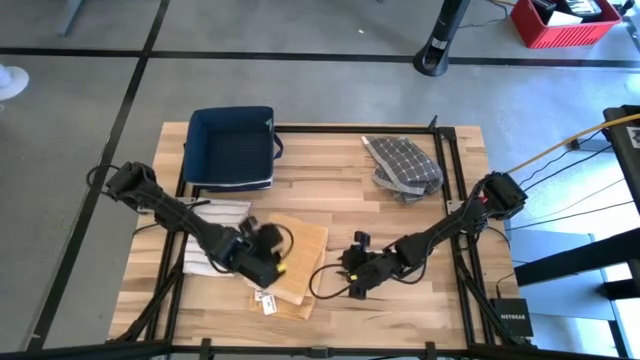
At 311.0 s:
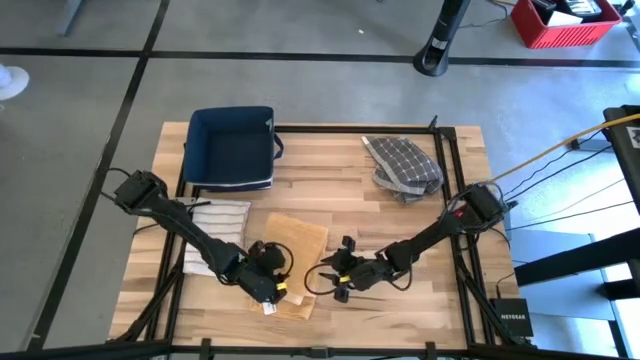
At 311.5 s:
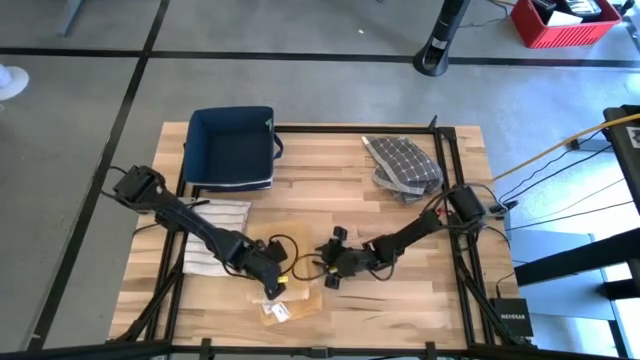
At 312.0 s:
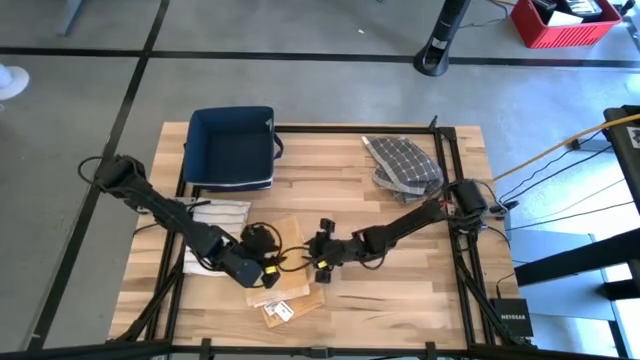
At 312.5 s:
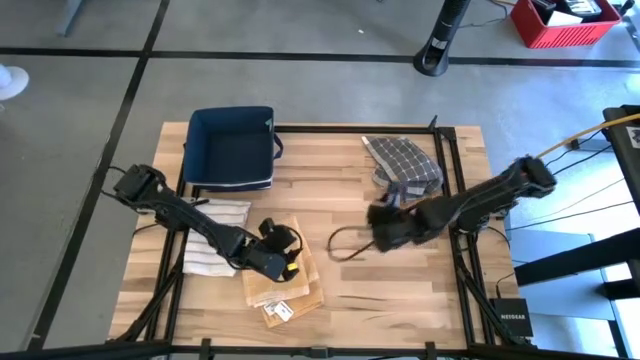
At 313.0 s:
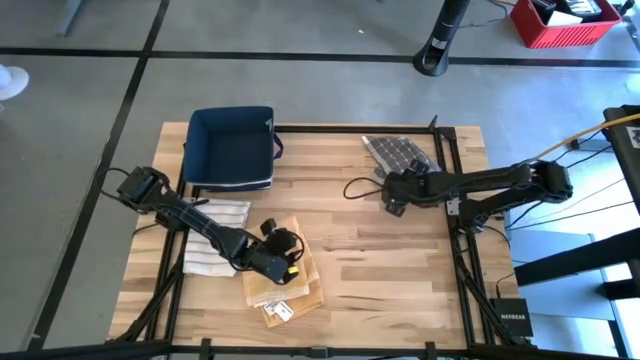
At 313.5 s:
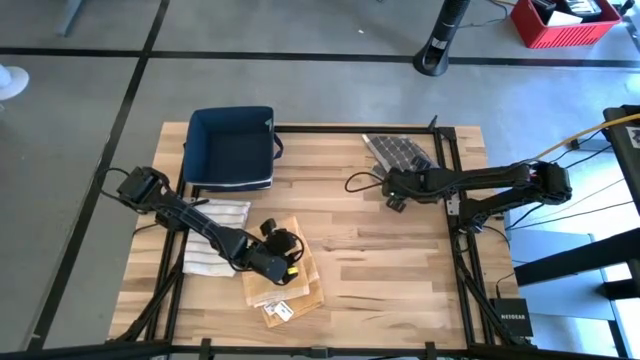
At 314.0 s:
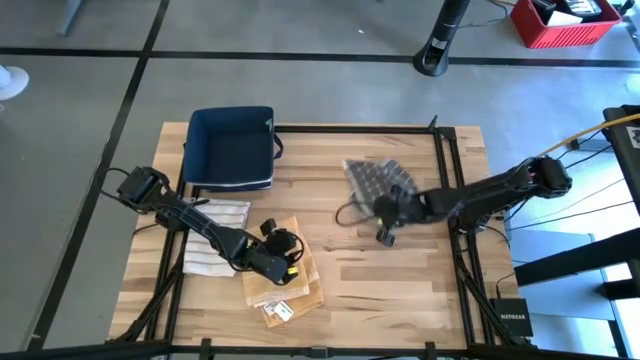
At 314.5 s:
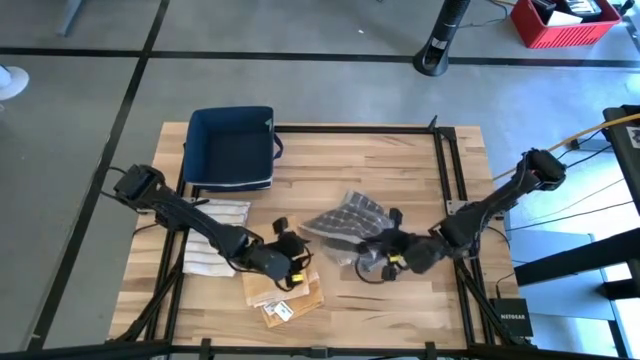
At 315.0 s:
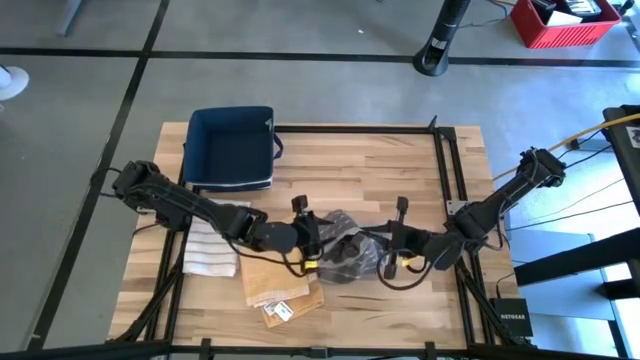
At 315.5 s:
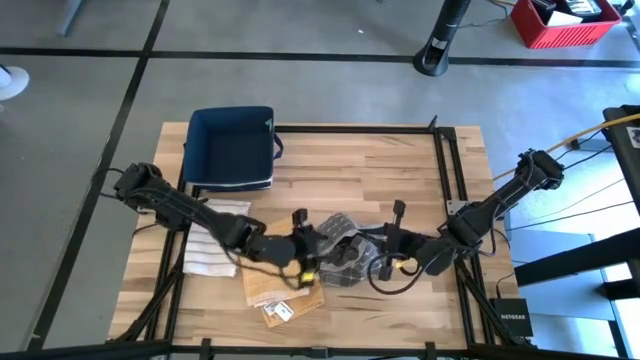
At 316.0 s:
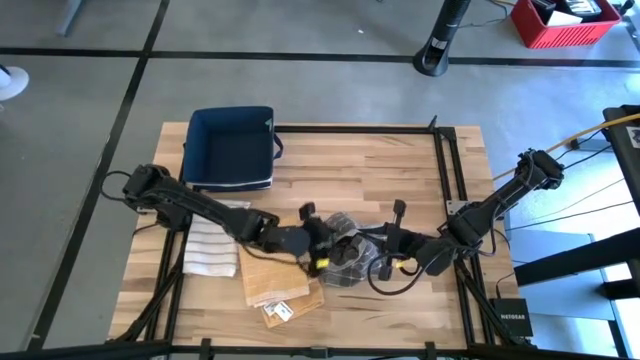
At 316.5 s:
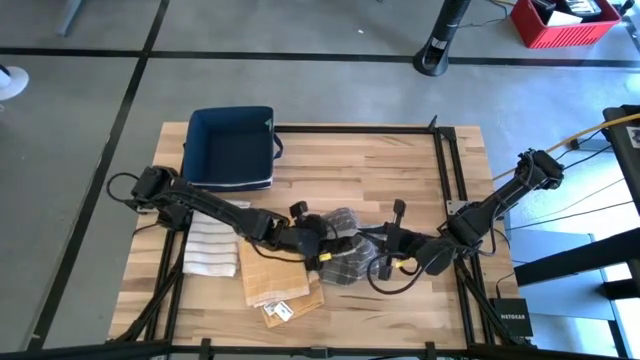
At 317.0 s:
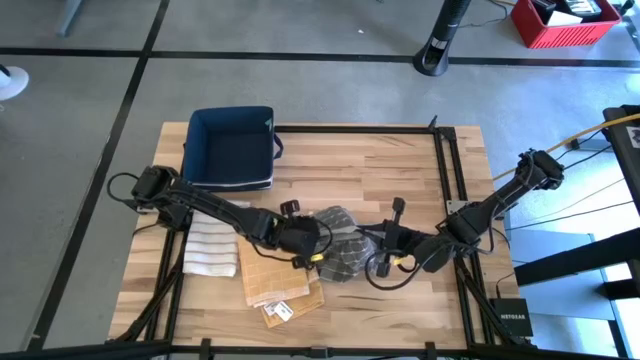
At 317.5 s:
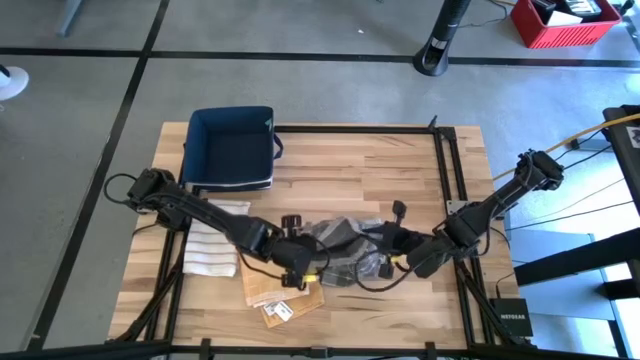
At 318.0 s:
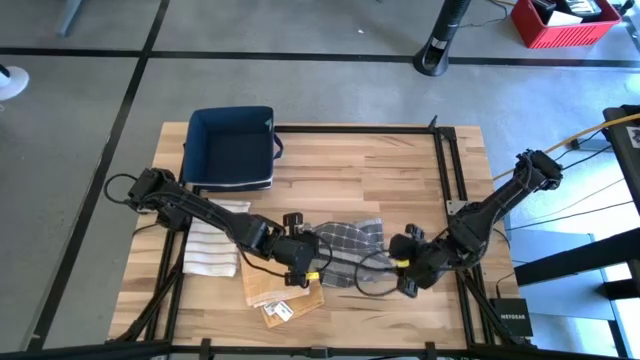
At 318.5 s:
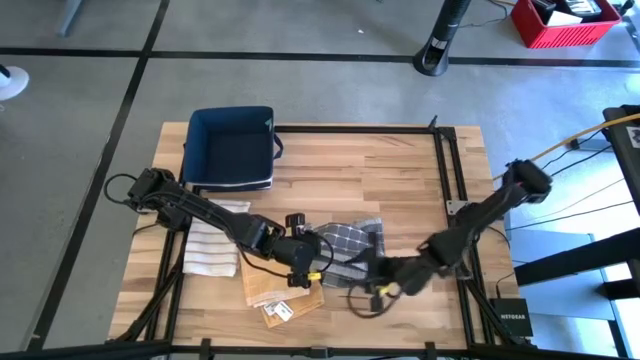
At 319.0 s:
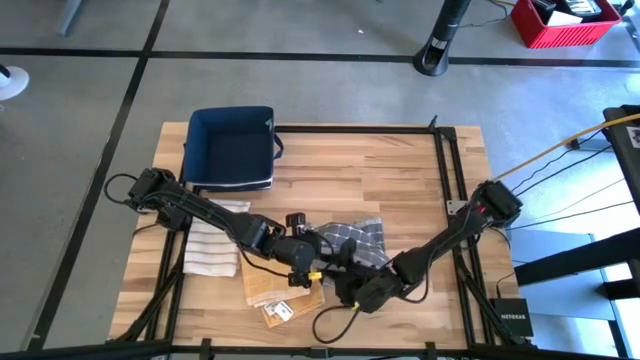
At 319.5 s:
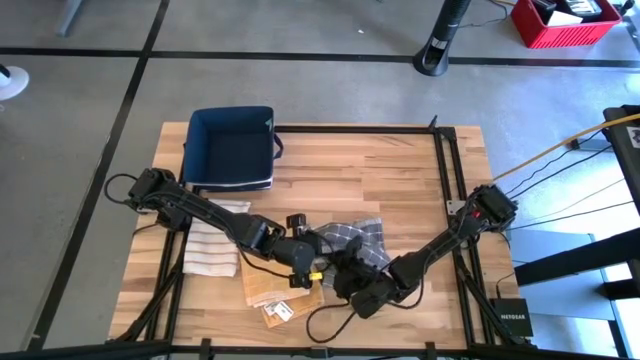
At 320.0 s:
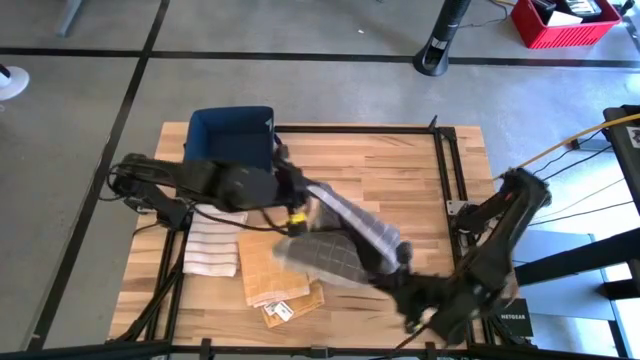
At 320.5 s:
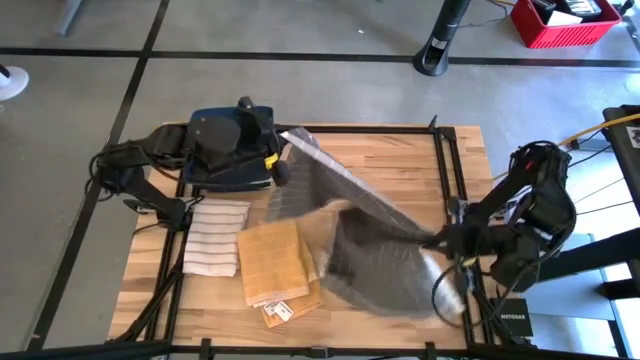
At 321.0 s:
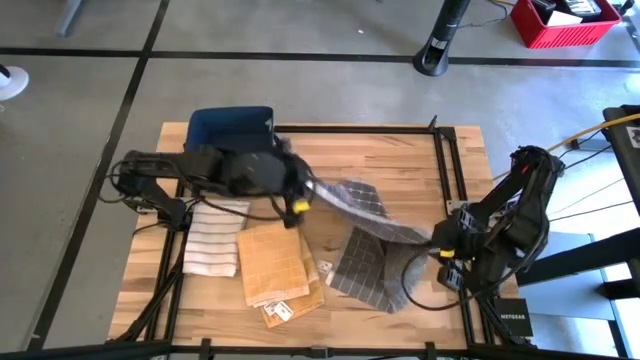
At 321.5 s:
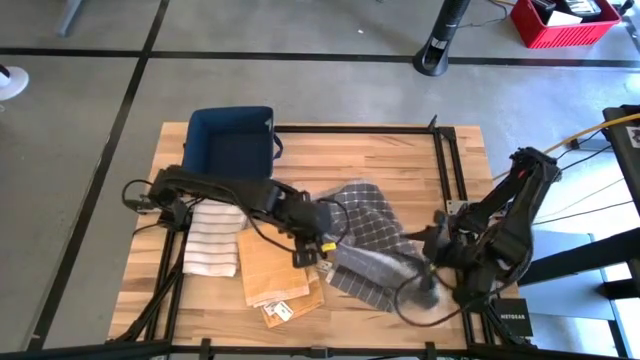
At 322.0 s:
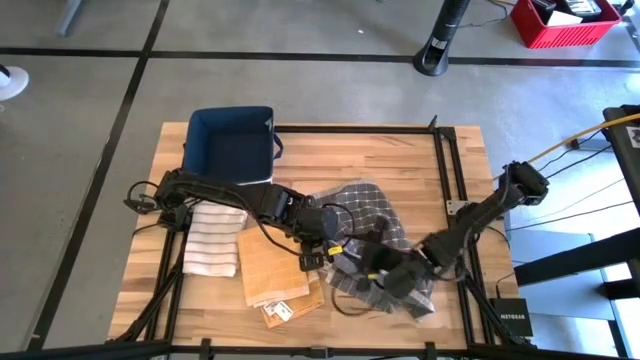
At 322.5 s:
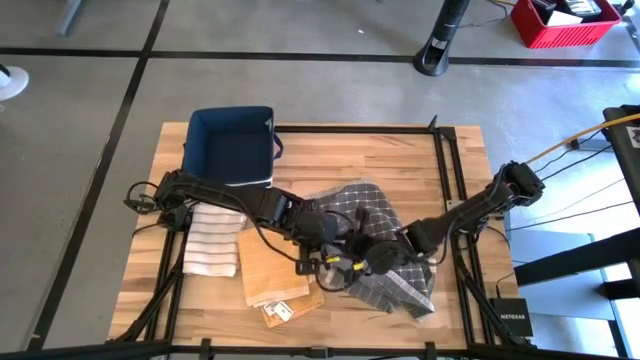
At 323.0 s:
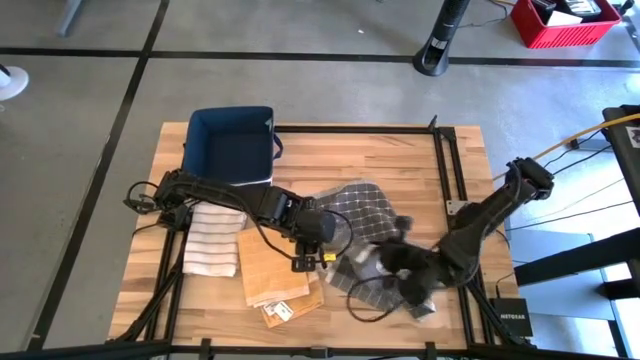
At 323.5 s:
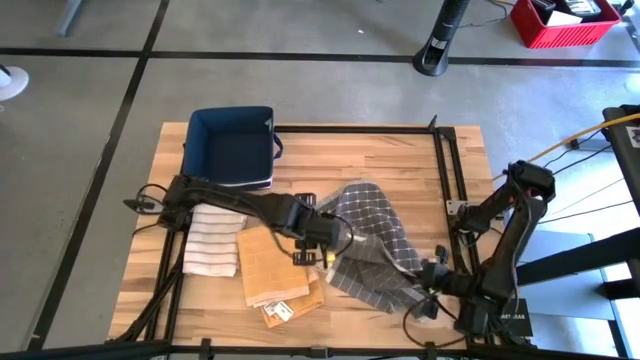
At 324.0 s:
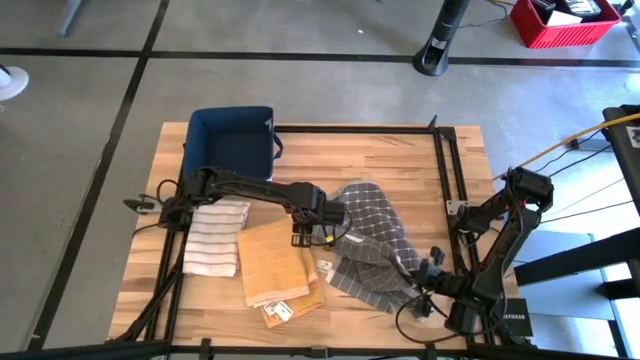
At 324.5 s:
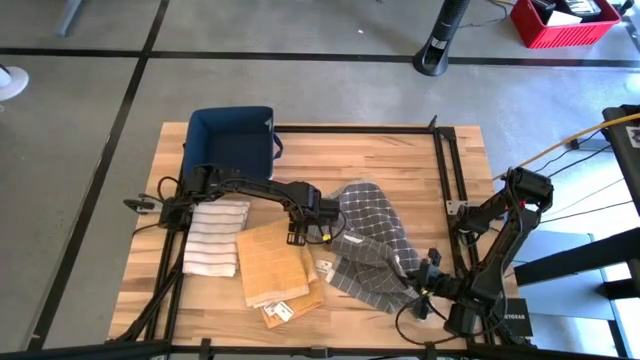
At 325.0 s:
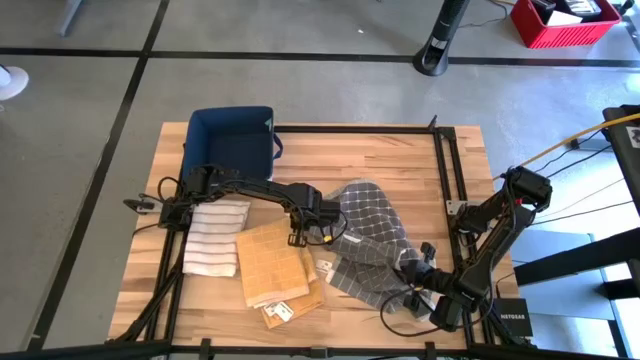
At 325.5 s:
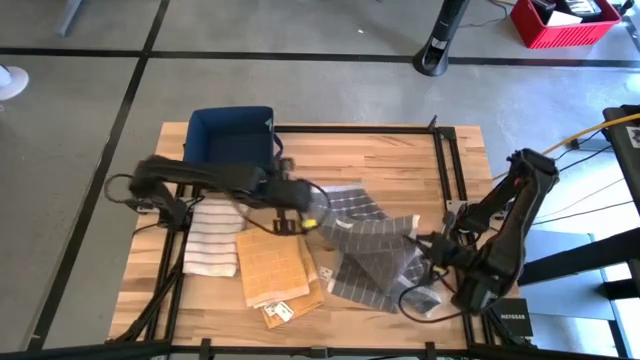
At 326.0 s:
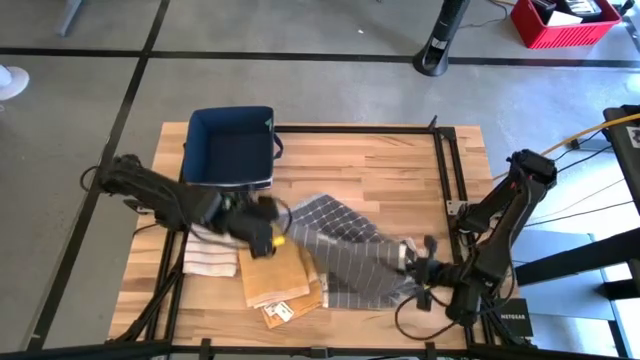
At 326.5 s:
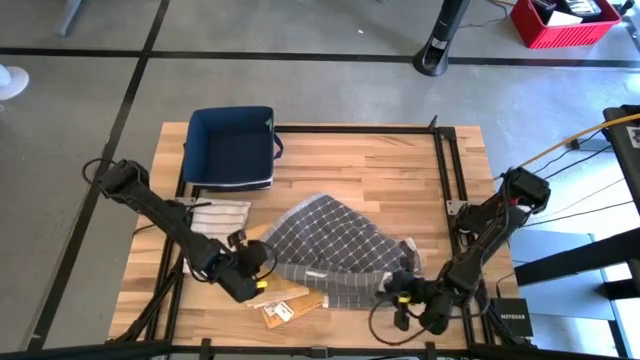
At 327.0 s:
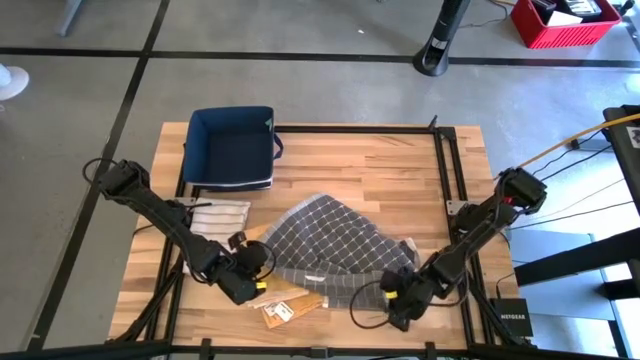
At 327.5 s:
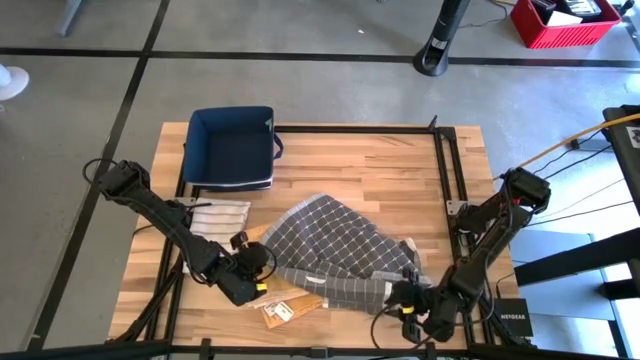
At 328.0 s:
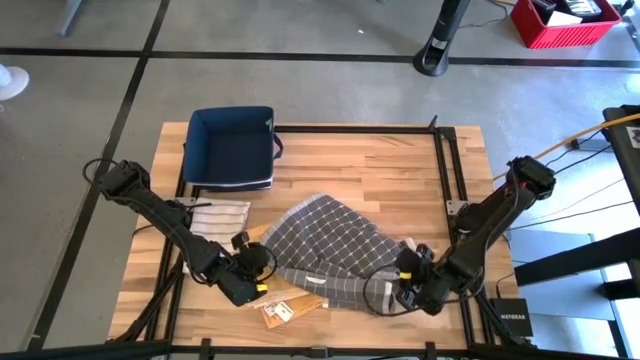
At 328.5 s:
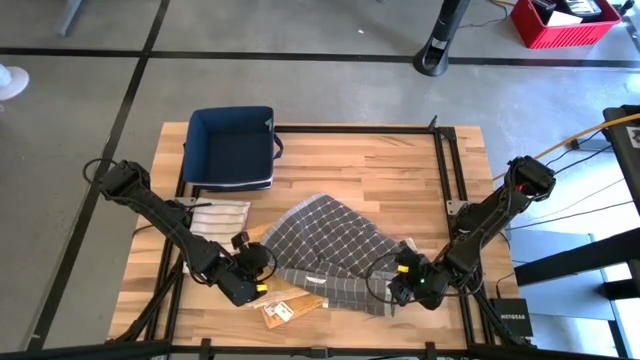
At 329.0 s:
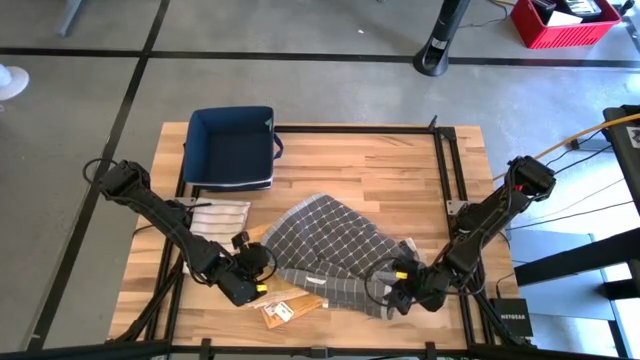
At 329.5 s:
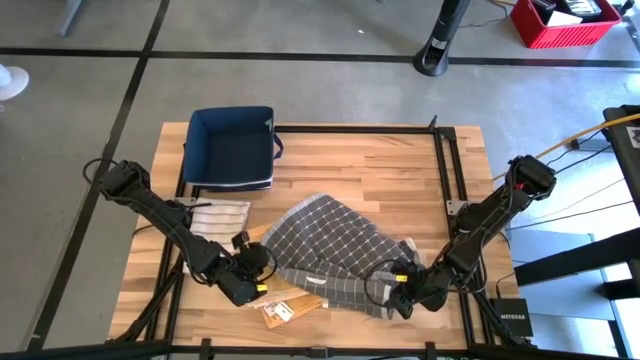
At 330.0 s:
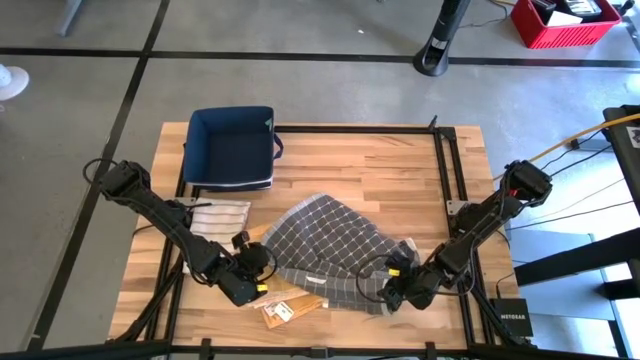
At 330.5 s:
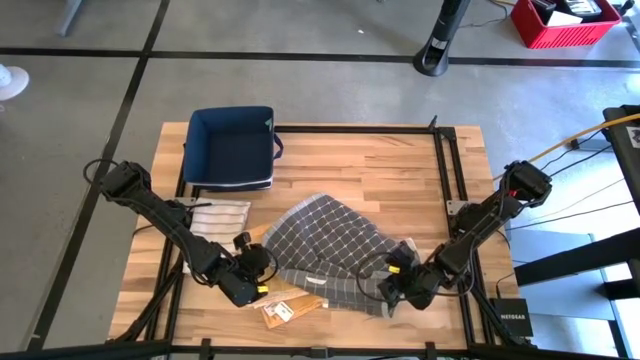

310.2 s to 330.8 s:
Task: Fold towel
Fold the gray pattern towel
